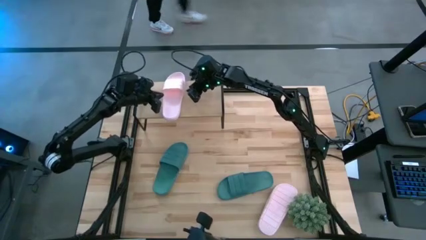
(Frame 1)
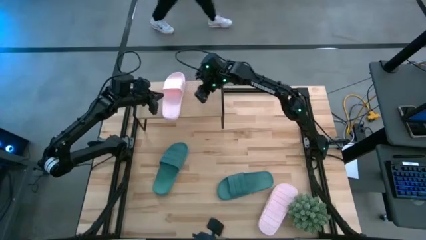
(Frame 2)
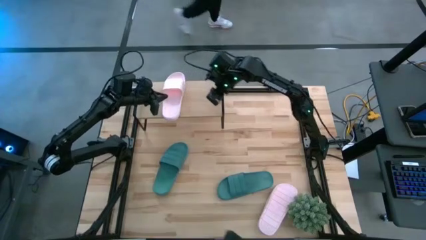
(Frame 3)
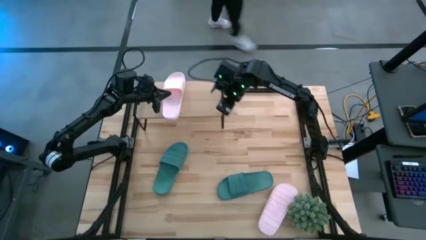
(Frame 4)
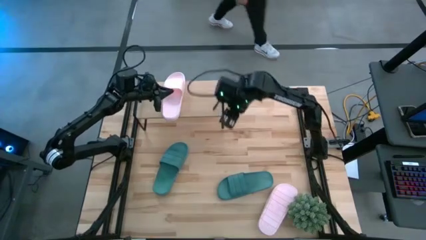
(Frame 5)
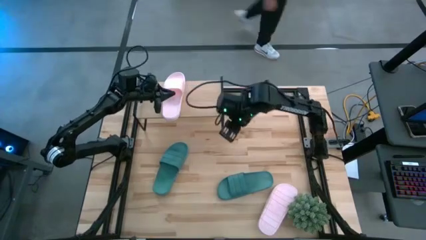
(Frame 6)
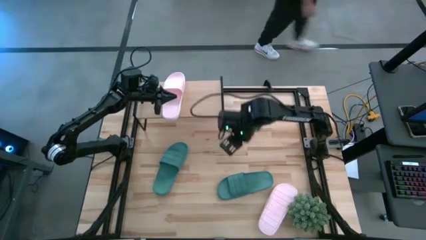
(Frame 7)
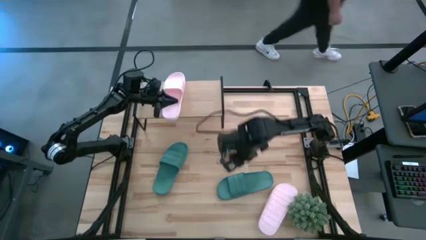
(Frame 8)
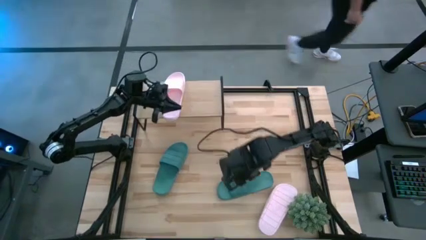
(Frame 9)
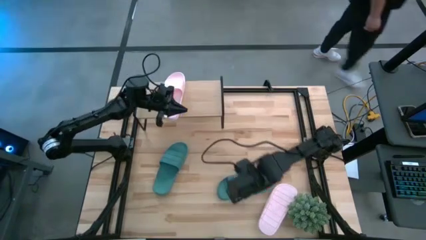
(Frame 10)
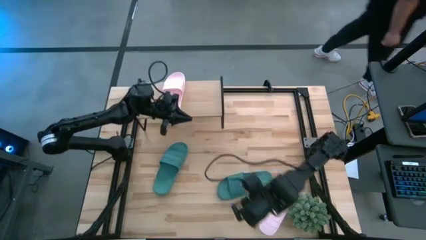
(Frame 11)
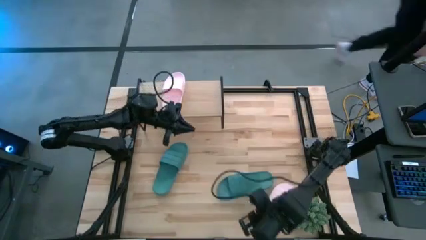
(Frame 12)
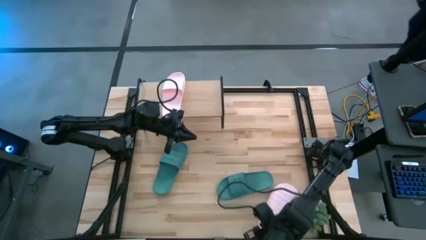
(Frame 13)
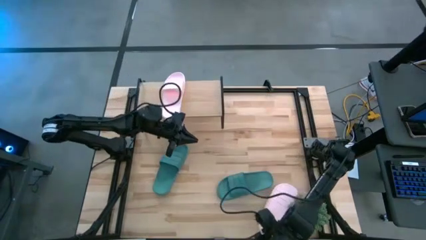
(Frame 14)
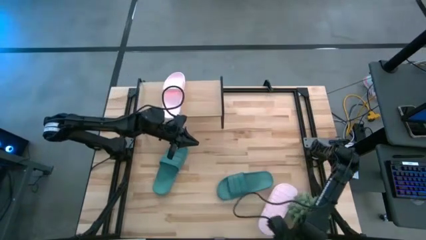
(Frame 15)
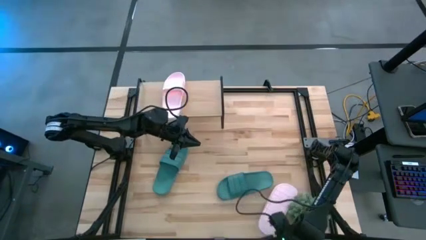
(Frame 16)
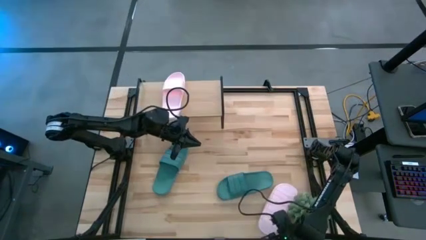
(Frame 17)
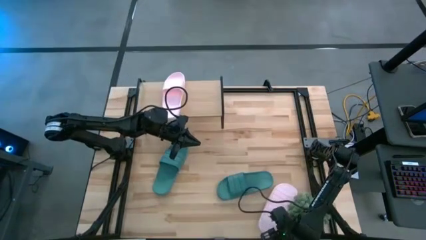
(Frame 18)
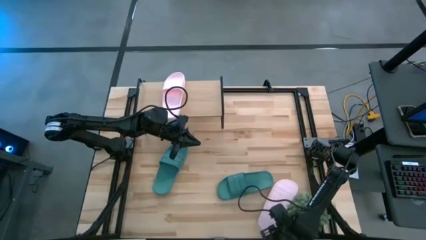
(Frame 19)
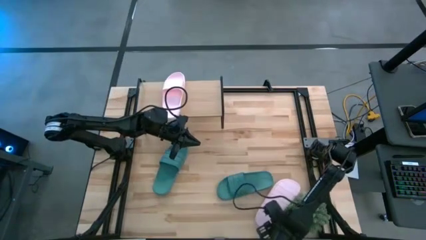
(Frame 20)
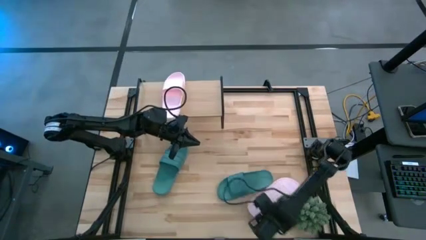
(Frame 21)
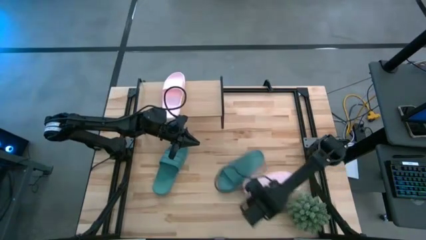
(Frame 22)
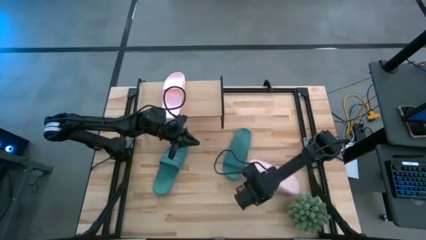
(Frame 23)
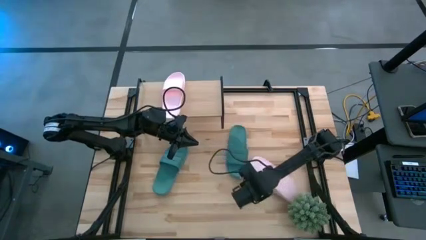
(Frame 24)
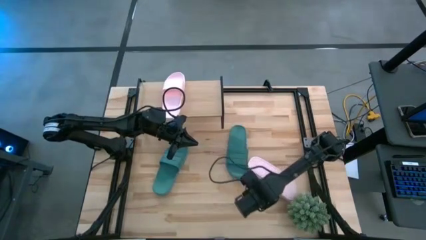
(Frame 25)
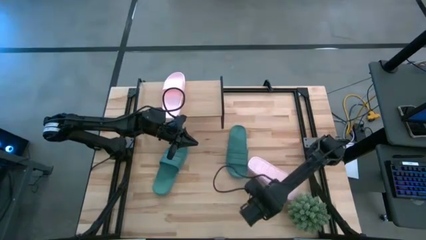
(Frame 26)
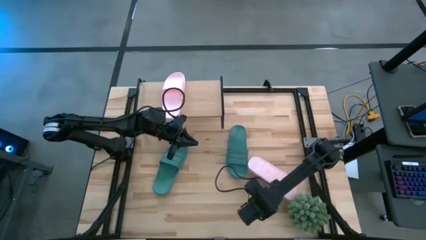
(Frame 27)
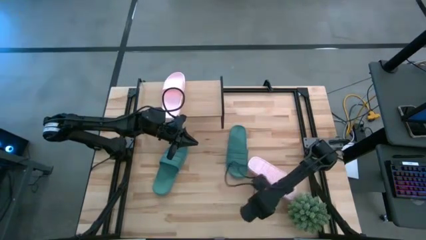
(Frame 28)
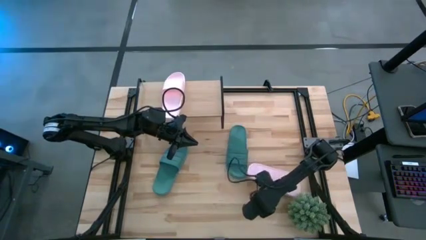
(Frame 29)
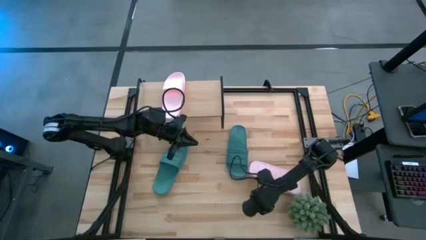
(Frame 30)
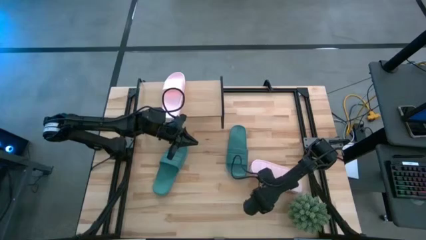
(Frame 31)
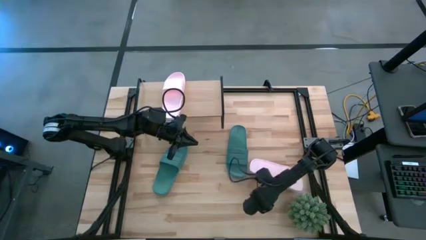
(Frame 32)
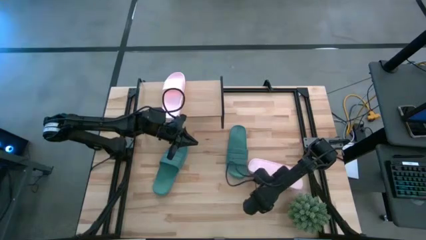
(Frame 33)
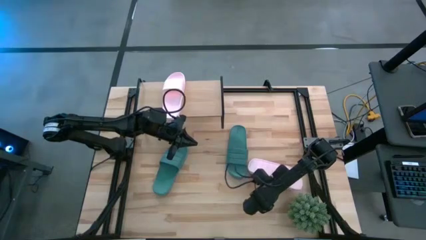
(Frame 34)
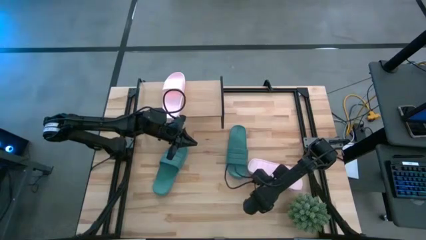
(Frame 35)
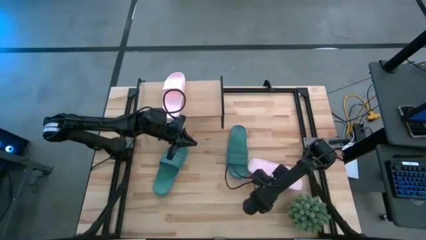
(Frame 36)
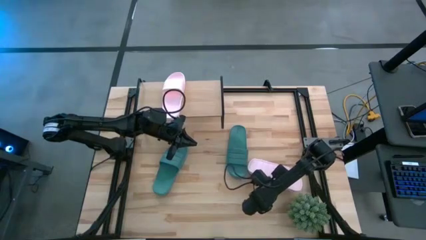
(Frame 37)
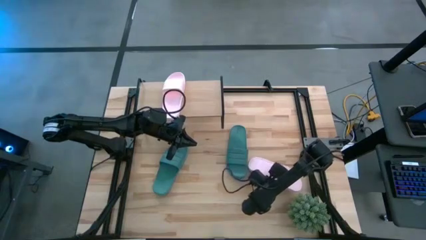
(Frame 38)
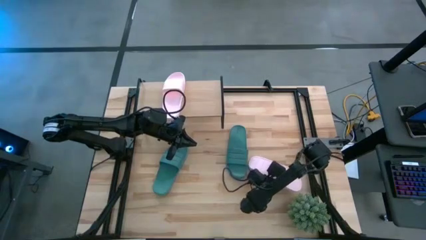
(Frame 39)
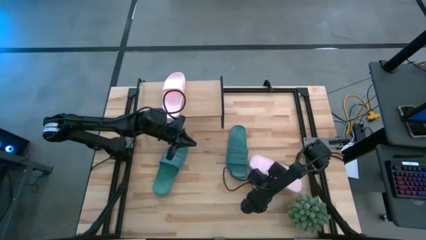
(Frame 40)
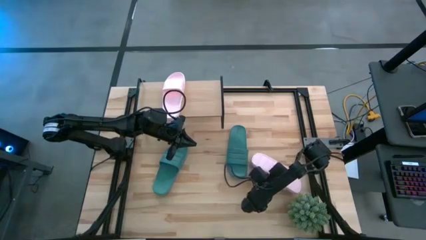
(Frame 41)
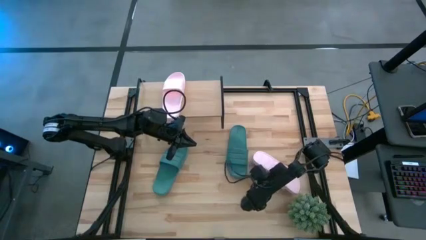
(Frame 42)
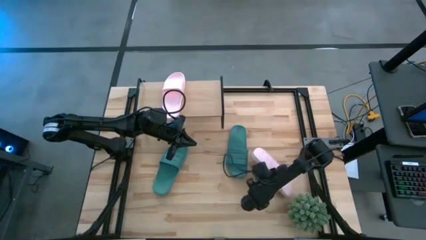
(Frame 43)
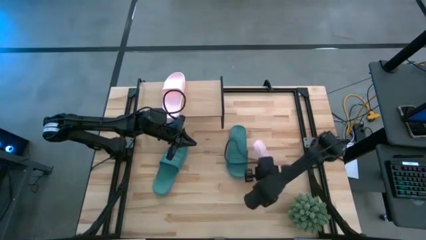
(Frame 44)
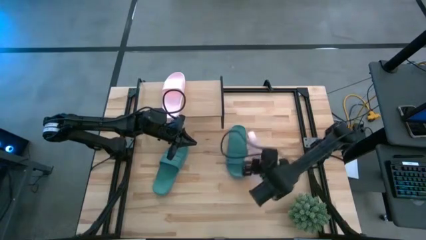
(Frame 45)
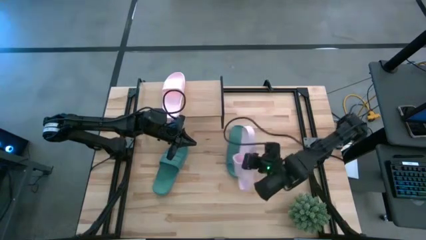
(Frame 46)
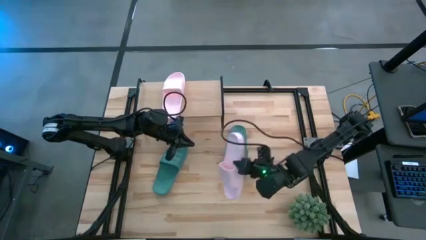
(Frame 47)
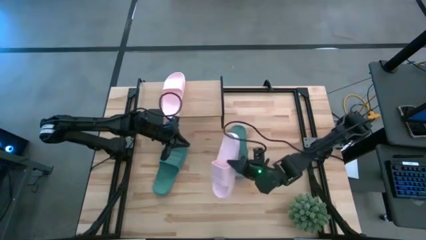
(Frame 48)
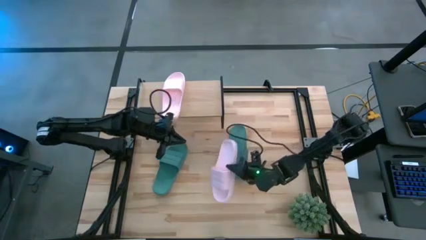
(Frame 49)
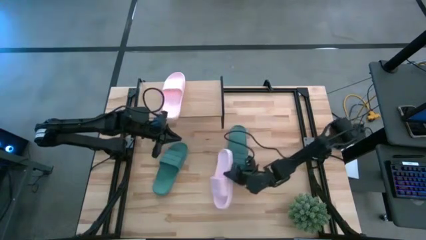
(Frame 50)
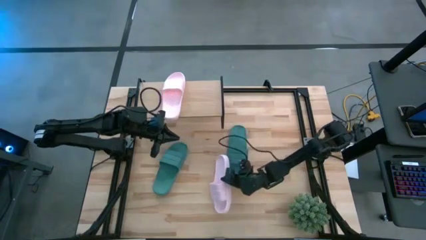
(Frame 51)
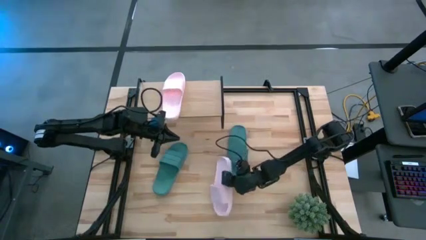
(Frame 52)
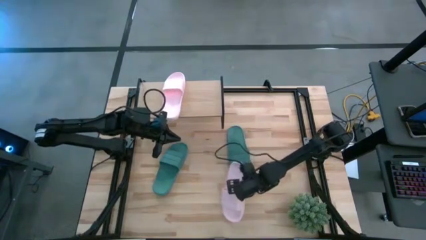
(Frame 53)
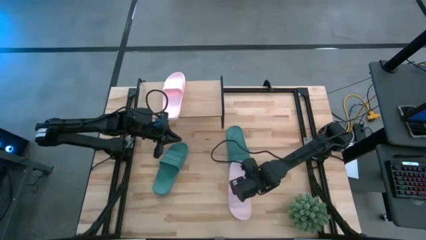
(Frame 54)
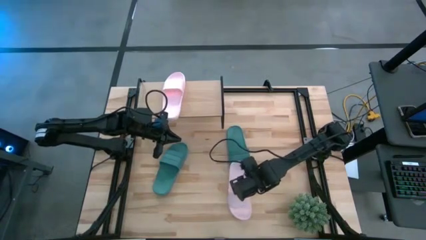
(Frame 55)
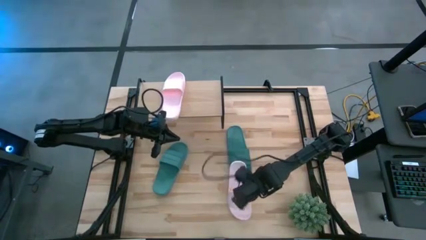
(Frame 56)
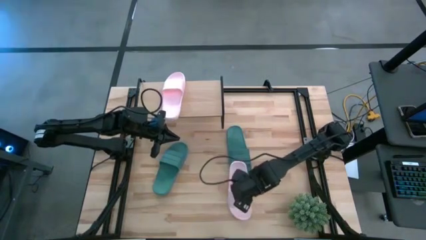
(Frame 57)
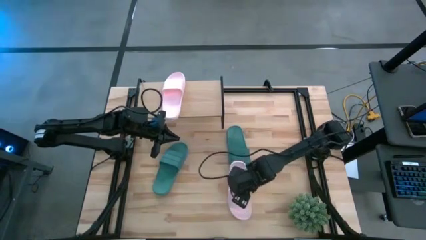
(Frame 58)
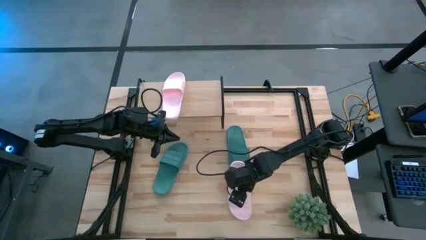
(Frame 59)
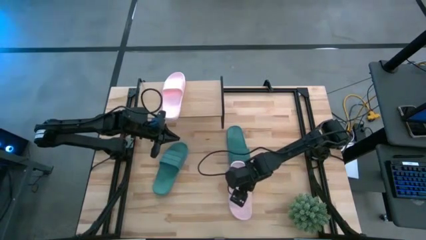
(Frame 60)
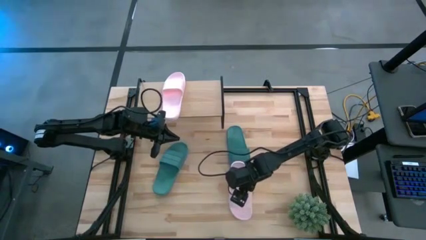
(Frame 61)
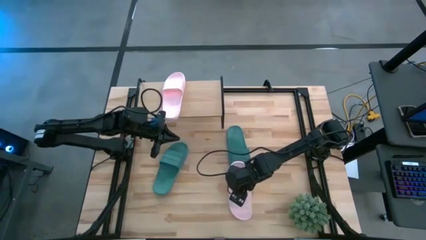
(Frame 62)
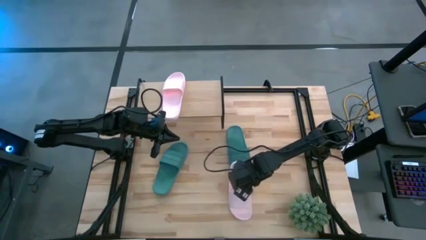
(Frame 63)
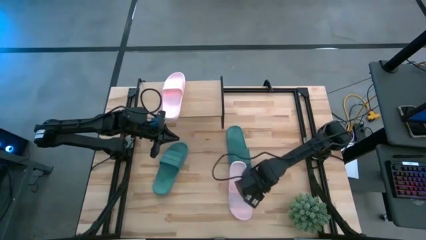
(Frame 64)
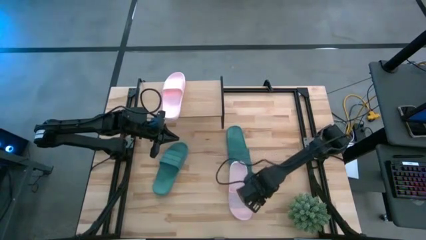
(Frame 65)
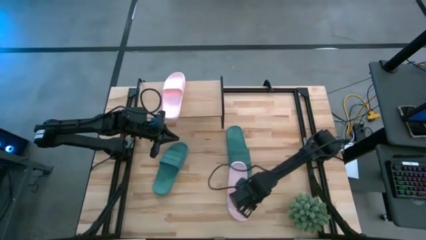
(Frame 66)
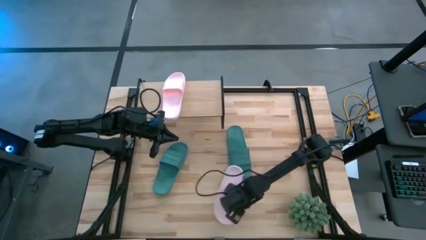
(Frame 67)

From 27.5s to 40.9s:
Task: Pick and place slides into the shelf
Put the pink slide on the shelf
